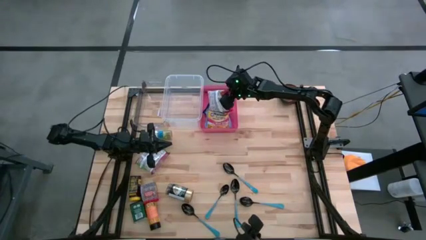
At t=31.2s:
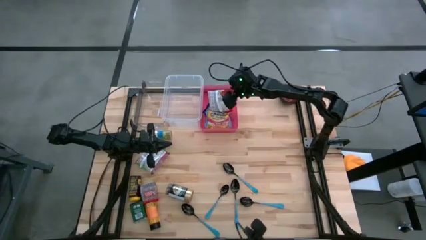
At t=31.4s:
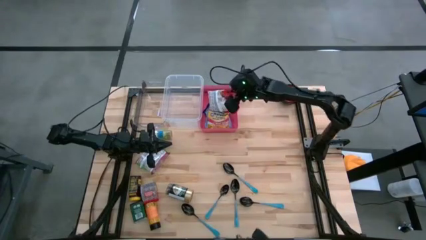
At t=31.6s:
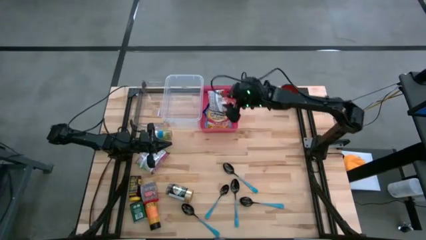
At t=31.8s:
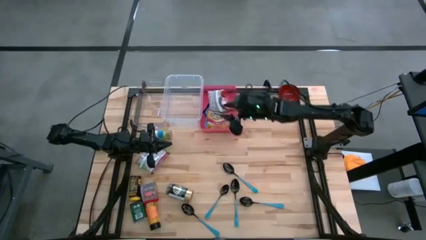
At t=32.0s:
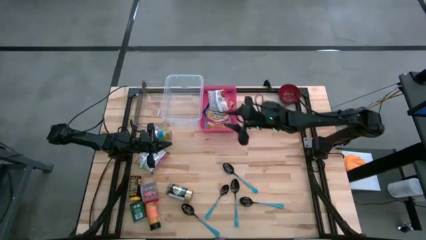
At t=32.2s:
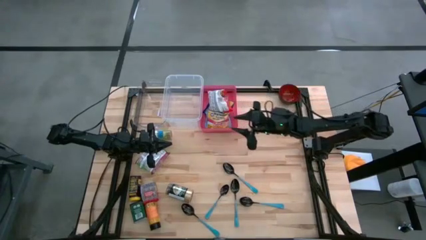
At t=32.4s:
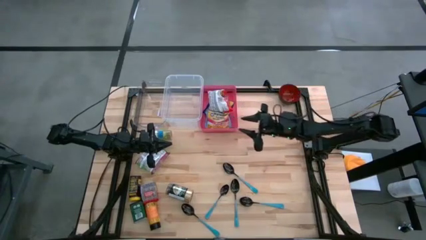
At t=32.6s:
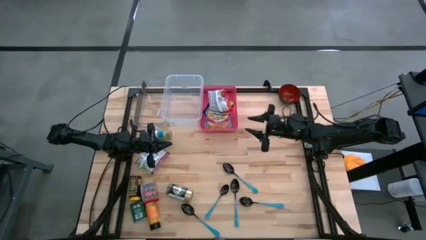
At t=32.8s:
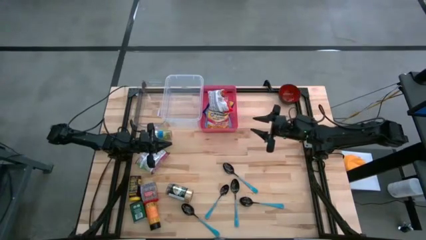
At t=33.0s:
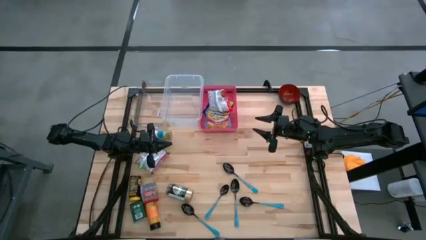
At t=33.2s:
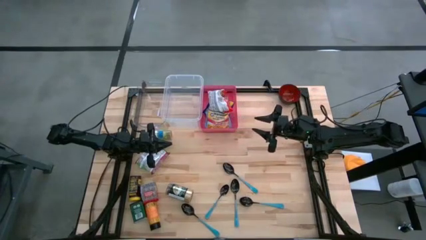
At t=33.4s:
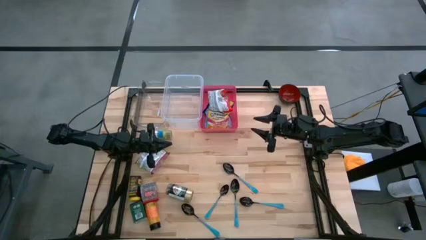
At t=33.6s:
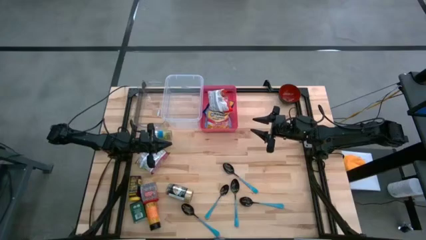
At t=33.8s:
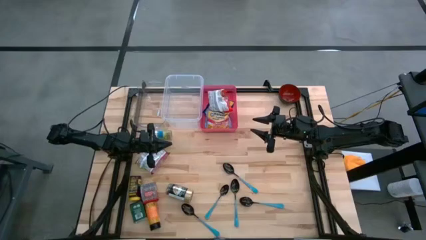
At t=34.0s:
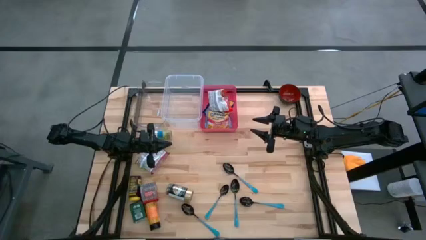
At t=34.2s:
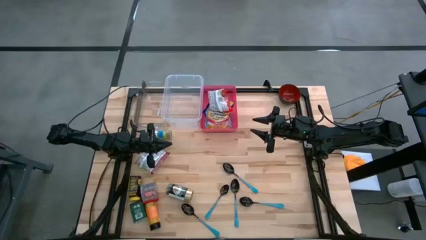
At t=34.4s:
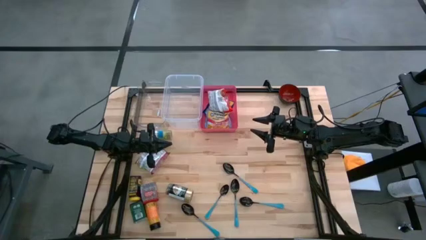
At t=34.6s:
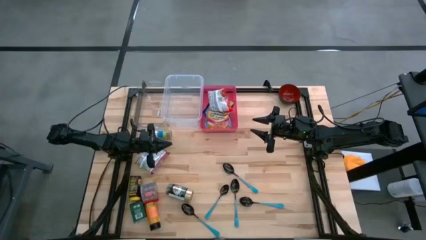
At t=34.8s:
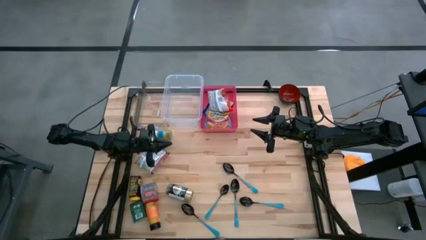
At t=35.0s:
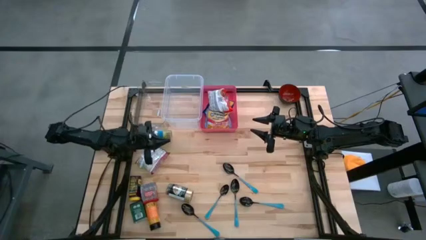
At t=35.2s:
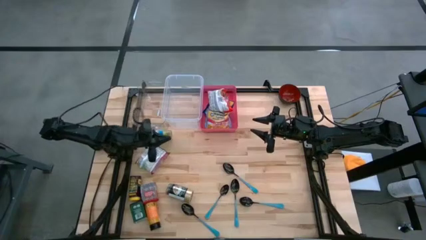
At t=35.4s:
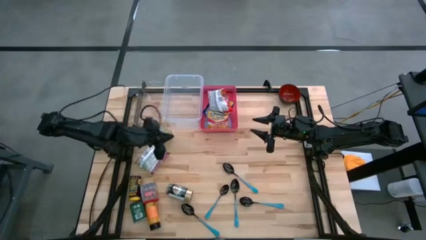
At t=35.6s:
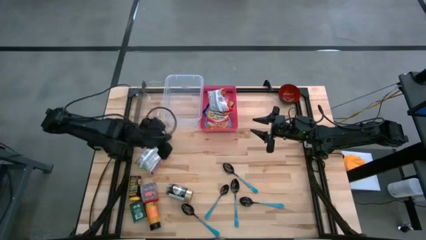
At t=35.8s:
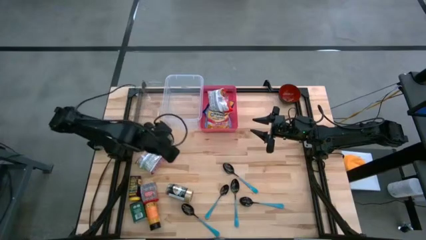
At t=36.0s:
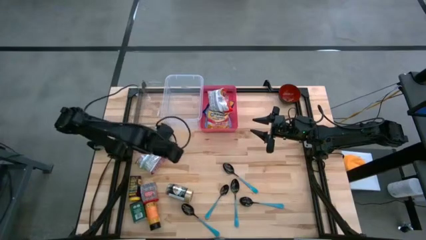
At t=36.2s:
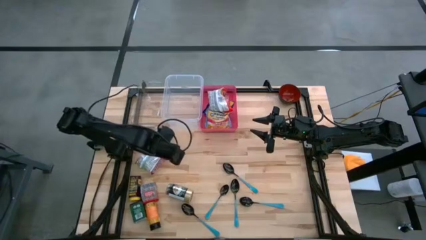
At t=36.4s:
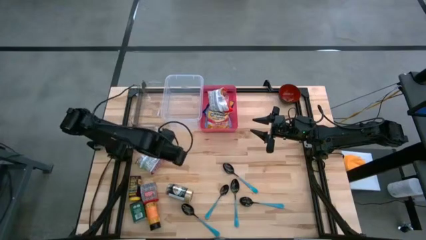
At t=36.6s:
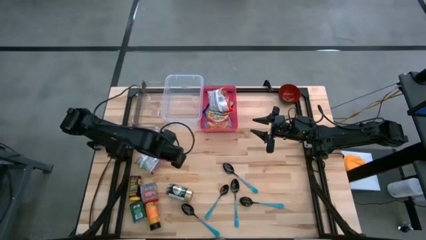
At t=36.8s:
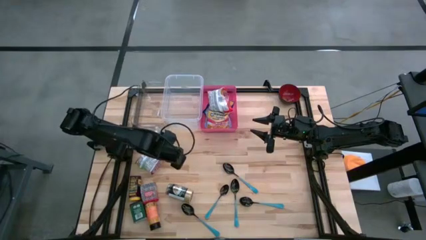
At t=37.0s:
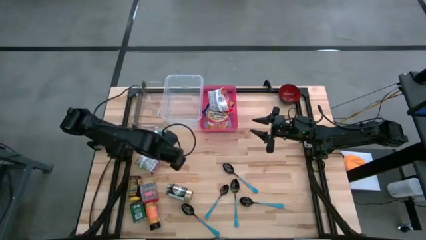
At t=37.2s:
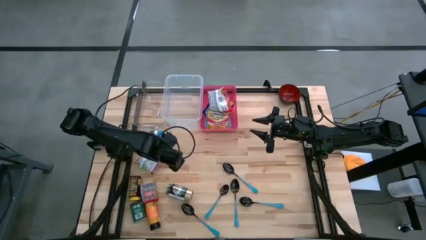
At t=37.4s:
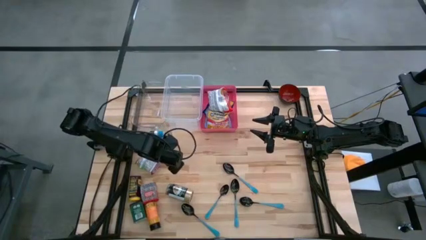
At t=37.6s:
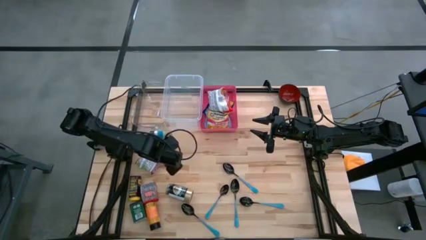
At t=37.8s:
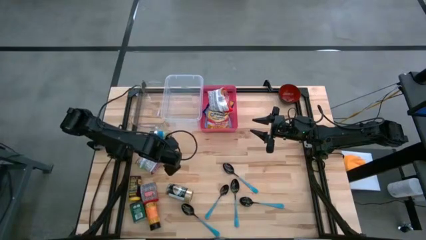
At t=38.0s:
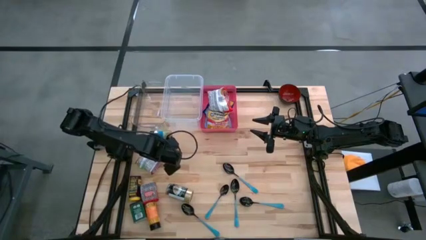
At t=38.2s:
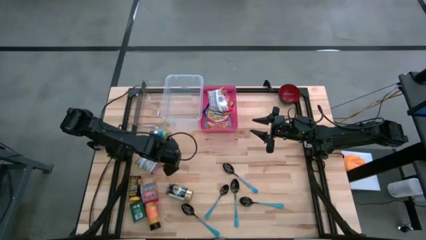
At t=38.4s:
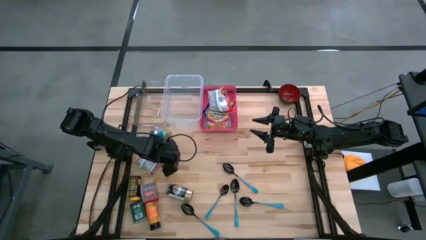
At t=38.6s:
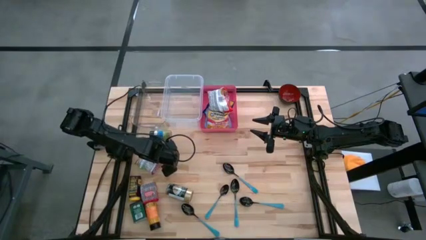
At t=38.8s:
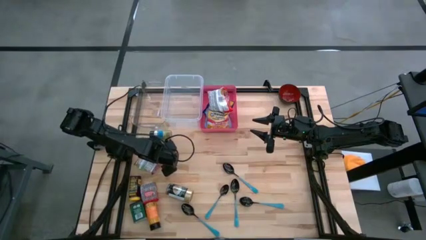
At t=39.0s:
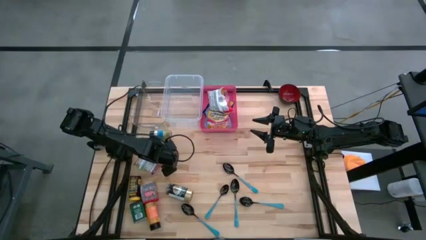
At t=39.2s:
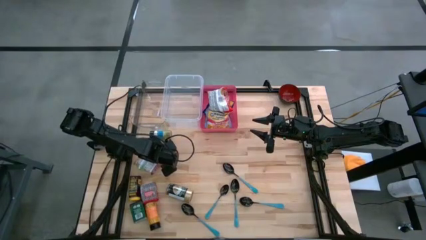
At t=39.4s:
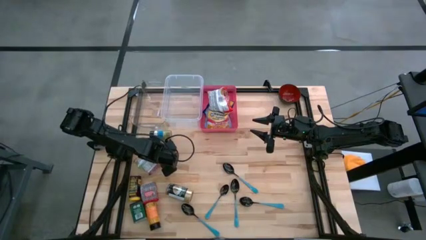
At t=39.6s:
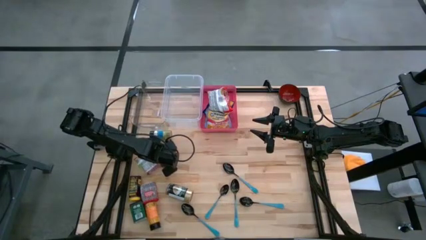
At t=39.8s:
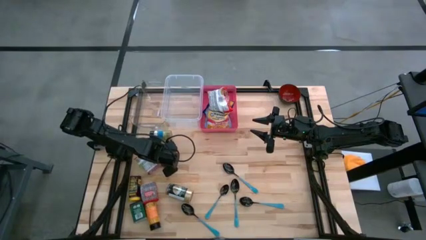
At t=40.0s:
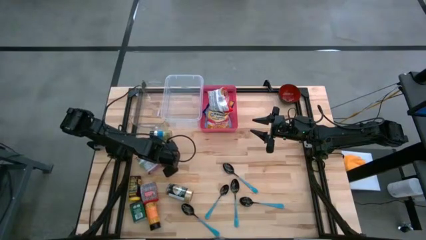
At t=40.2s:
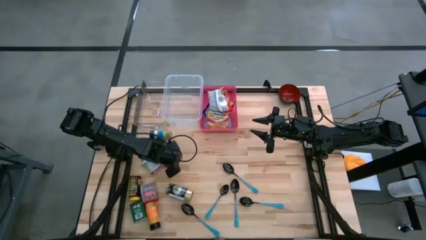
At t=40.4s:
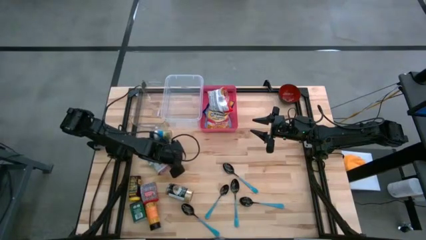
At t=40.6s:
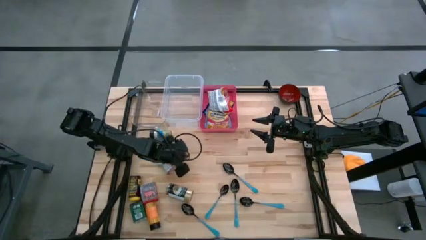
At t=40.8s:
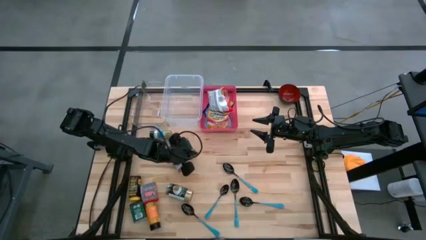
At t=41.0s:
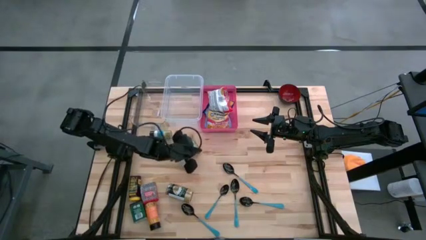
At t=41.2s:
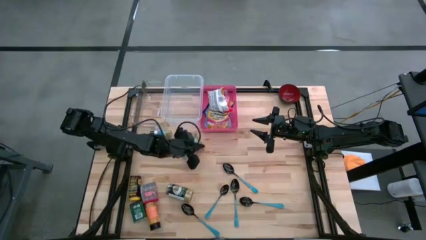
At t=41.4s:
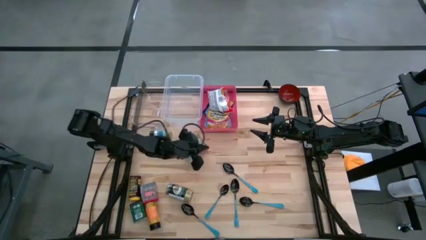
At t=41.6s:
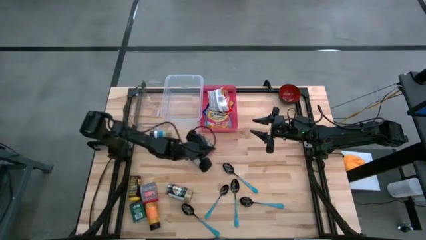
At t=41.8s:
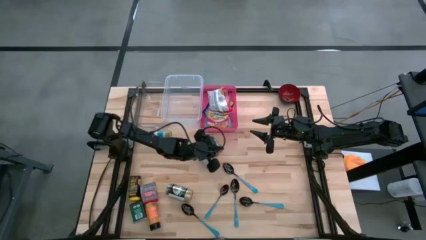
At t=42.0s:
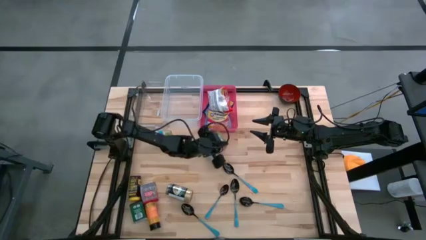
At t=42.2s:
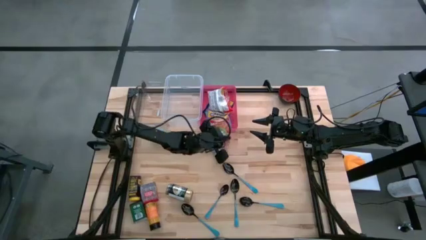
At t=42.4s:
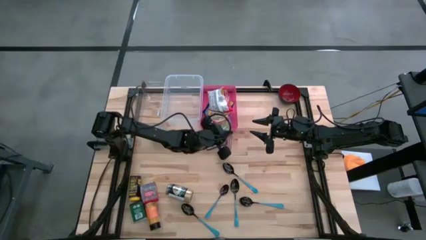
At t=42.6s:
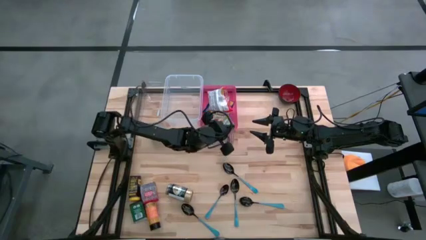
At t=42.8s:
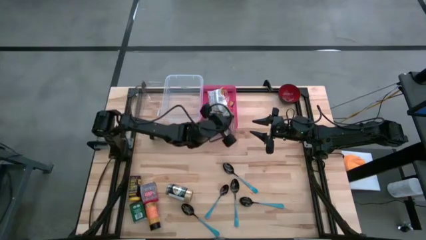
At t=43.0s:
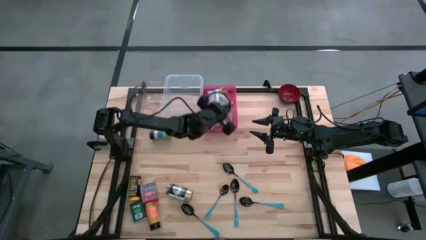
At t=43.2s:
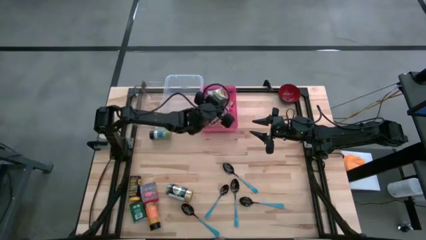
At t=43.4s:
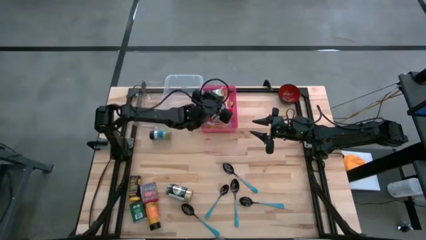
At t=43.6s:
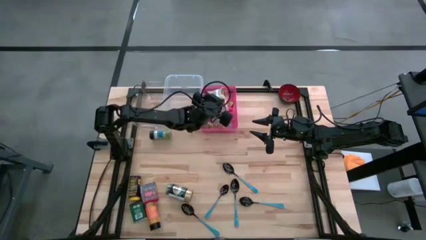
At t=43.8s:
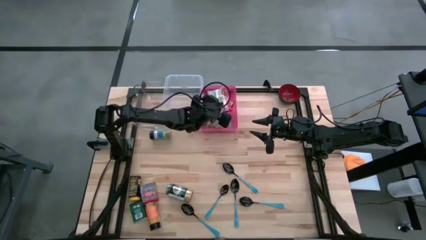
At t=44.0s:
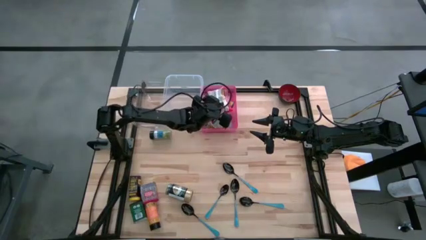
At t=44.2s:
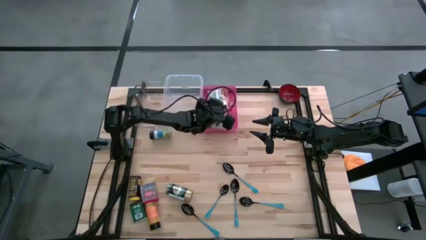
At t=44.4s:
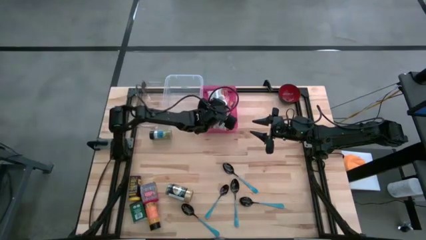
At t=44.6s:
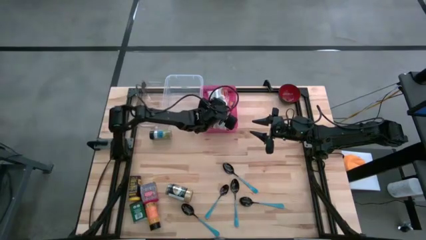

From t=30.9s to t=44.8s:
Put the green noodle pack into the pink bin
